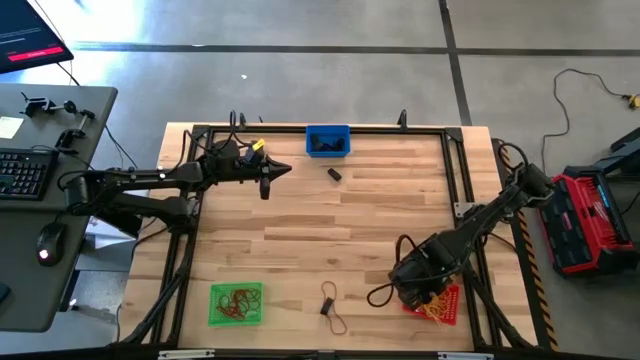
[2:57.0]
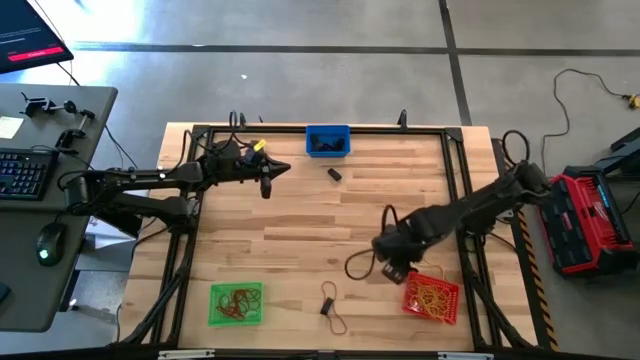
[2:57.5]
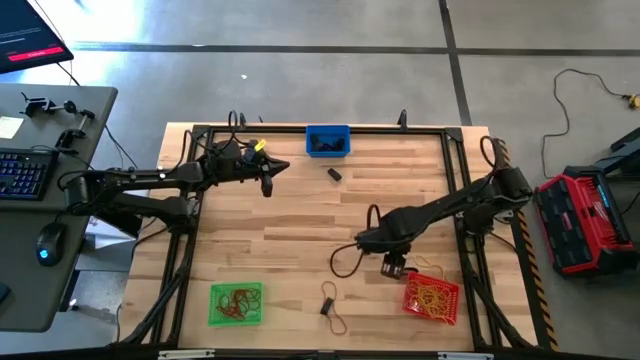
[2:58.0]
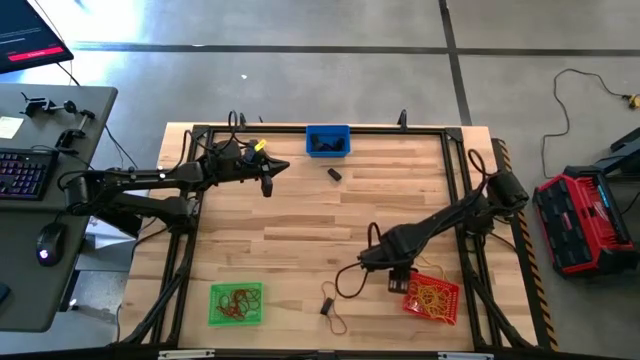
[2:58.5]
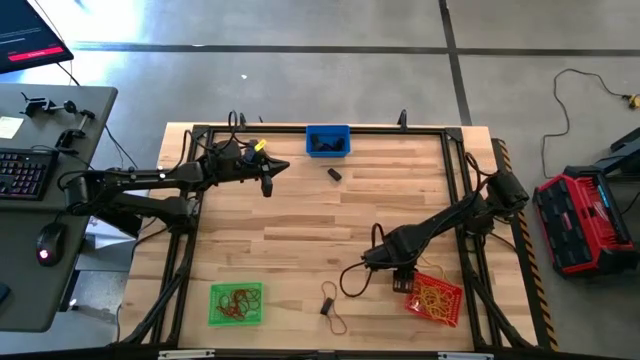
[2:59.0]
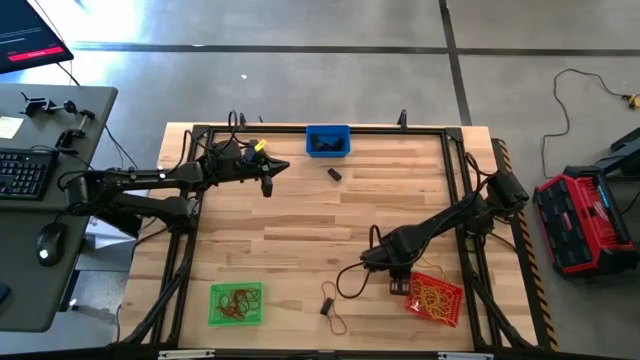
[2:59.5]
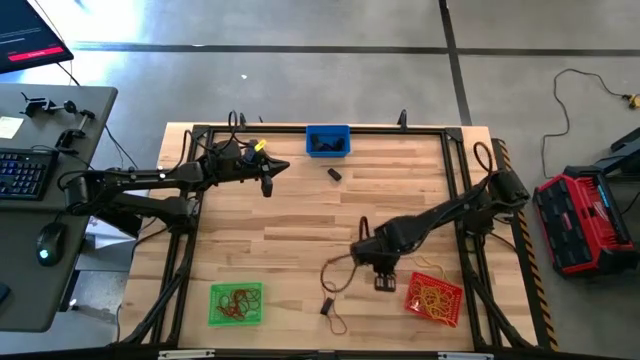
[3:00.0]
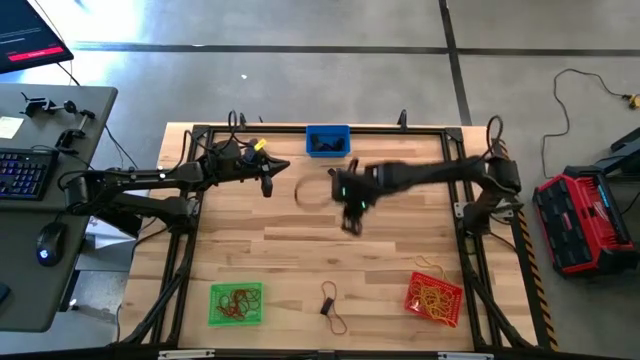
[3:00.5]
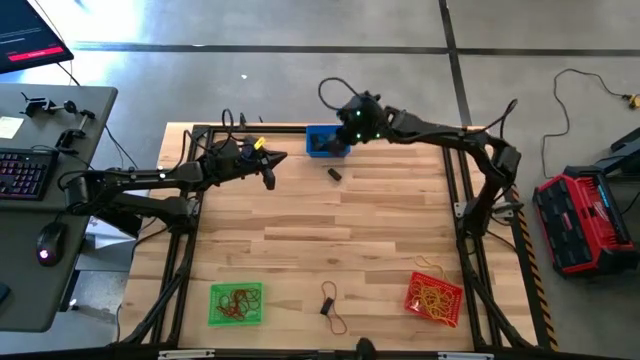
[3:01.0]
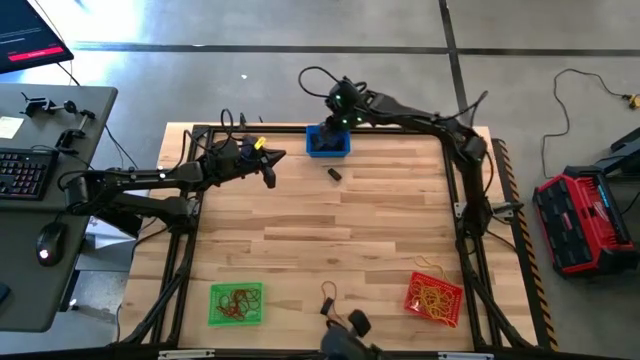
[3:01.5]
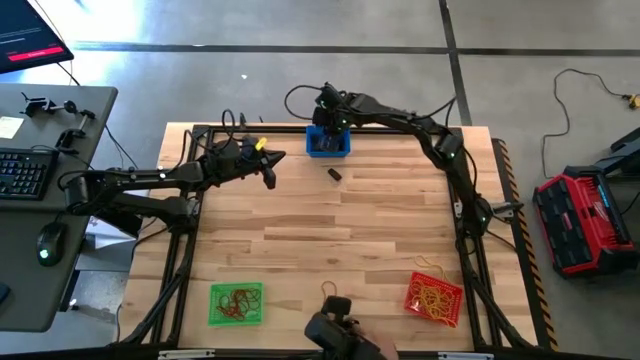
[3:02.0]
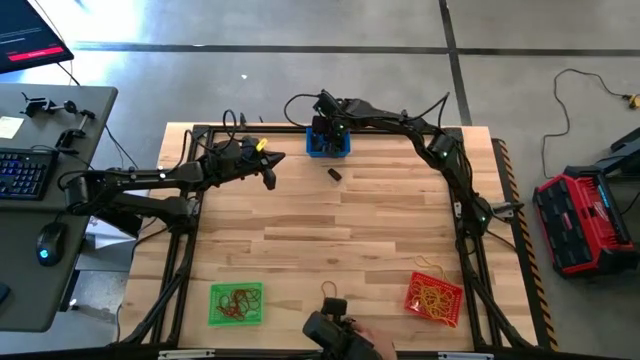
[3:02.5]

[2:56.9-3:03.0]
Task: Sort rubber bands into baskets
Put the black rubber band into the blue basket

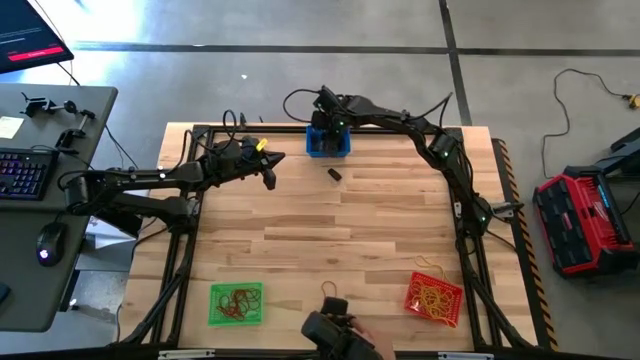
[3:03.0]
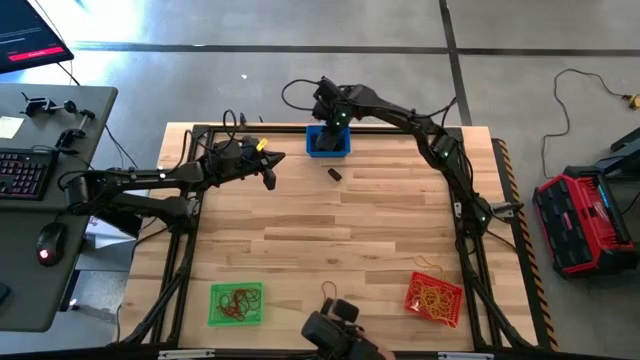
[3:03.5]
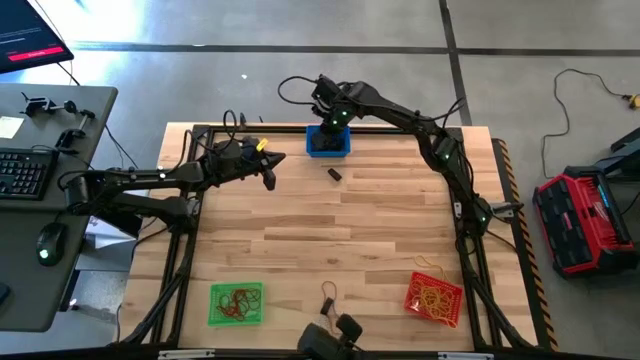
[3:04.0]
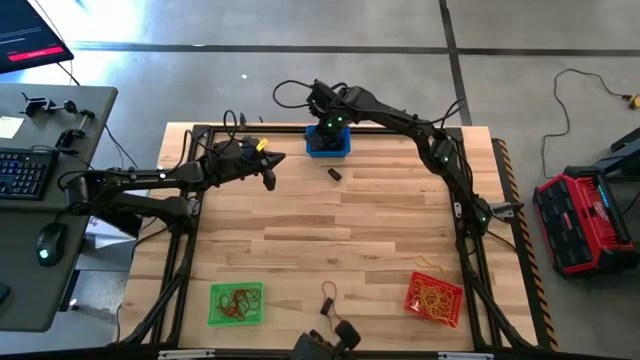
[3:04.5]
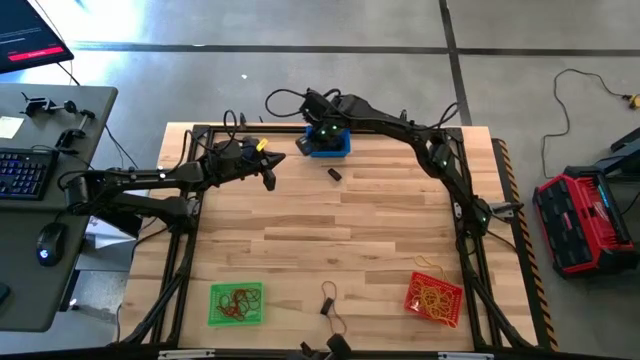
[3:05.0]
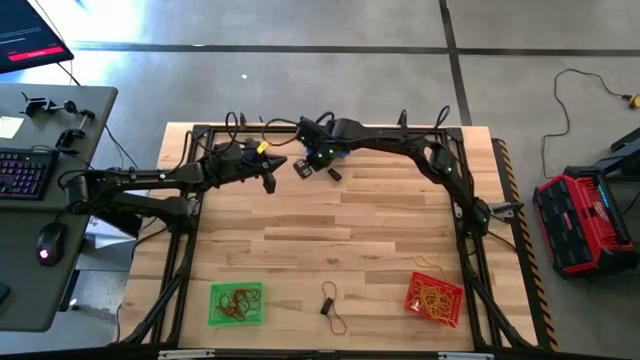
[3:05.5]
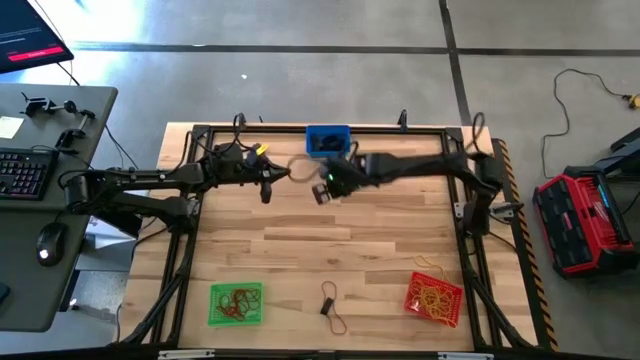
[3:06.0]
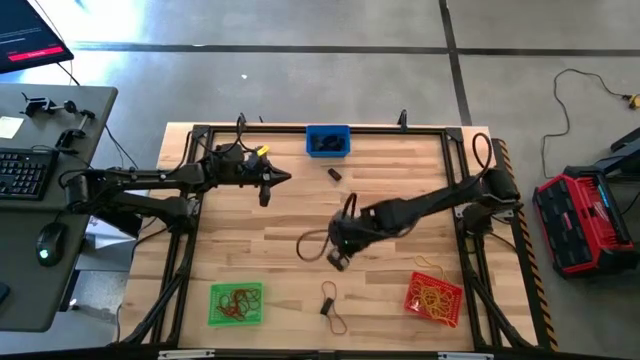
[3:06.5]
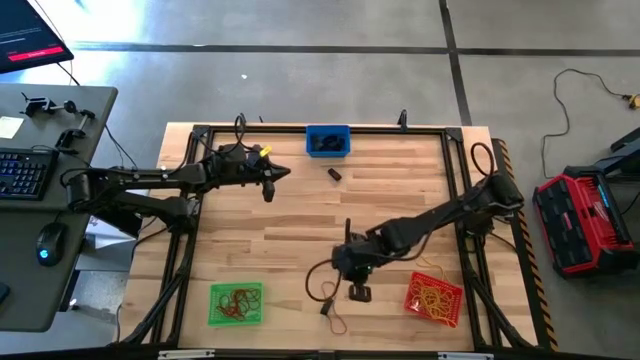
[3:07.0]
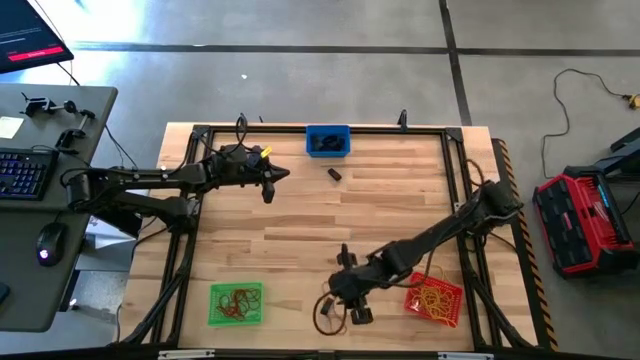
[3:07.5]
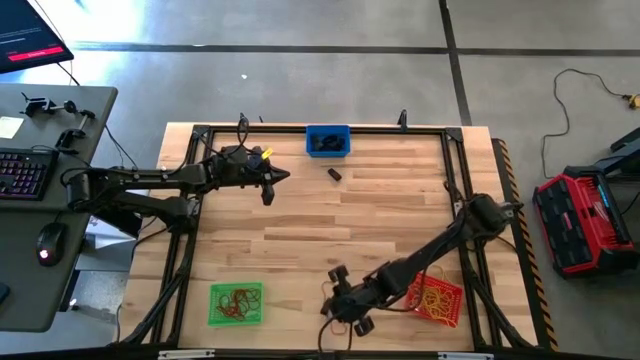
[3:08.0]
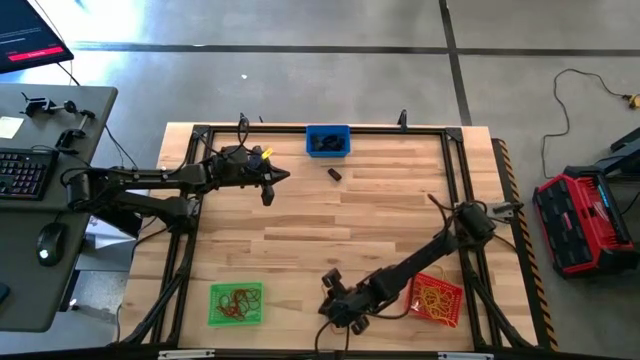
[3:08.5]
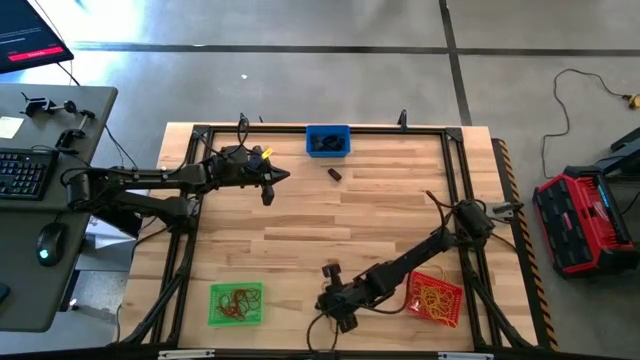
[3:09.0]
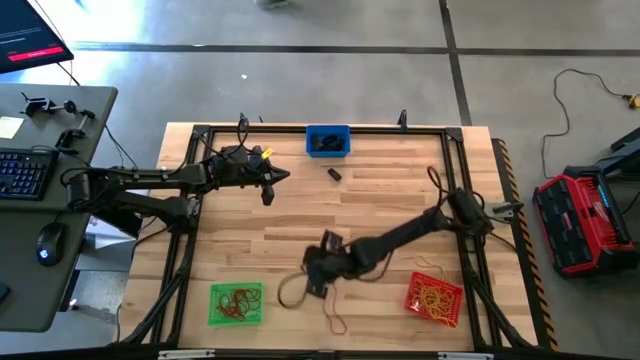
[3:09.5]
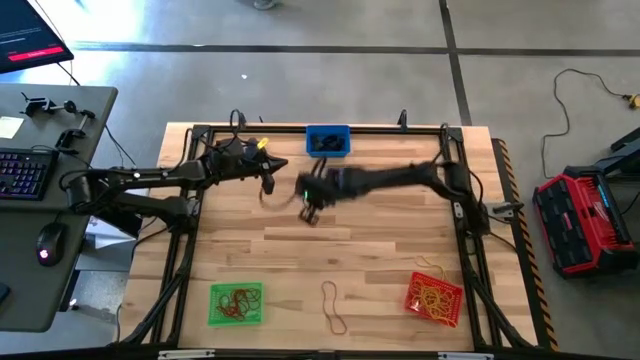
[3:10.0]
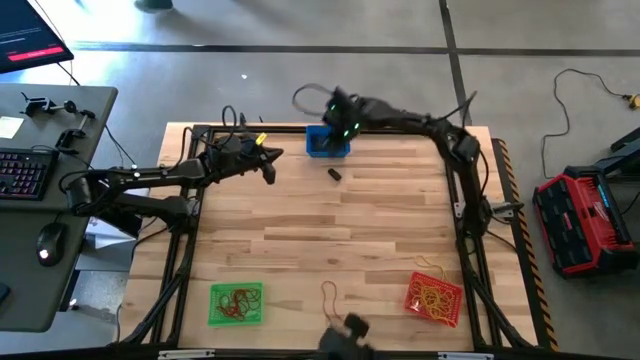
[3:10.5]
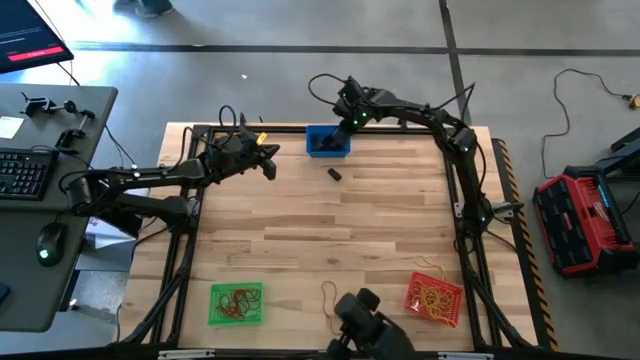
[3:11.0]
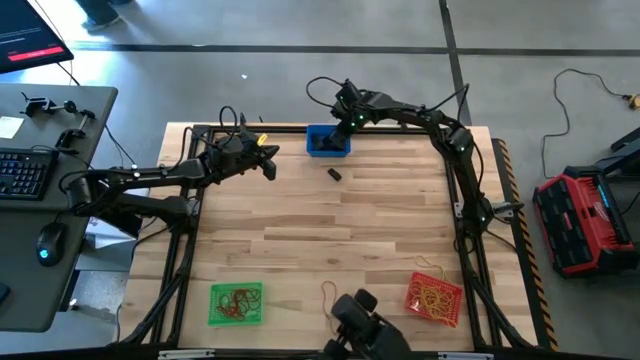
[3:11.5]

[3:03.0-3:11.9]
Put the black rubber band into the blue basket

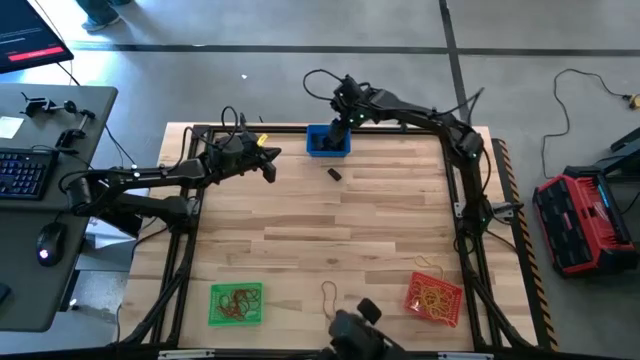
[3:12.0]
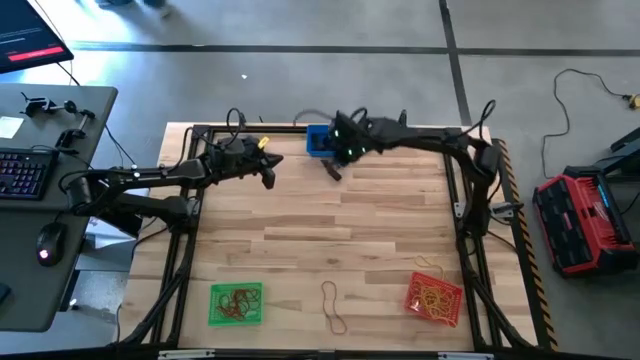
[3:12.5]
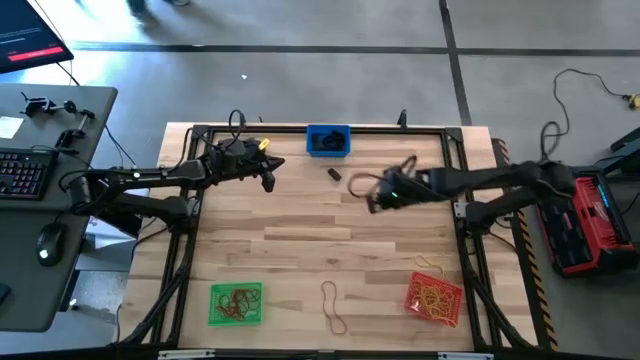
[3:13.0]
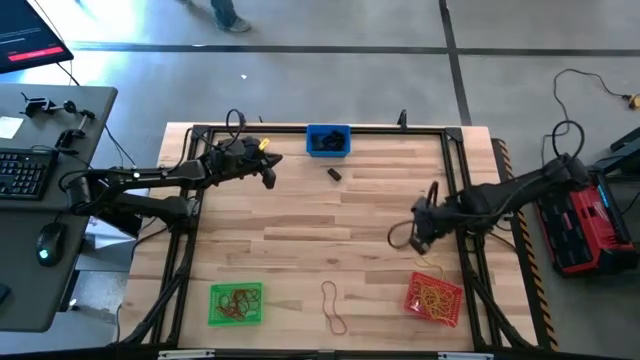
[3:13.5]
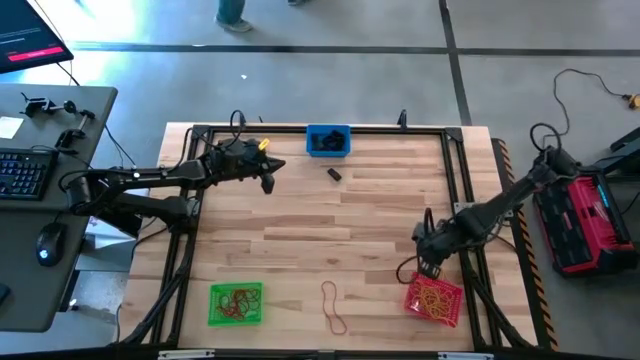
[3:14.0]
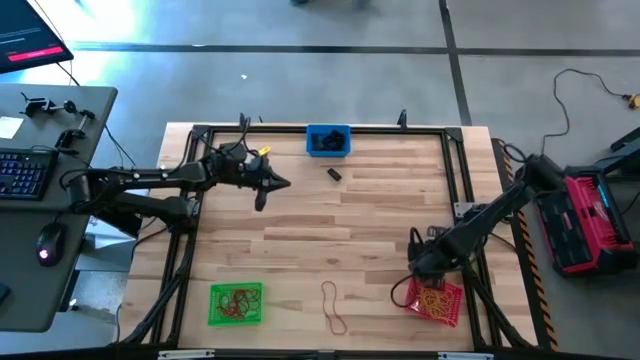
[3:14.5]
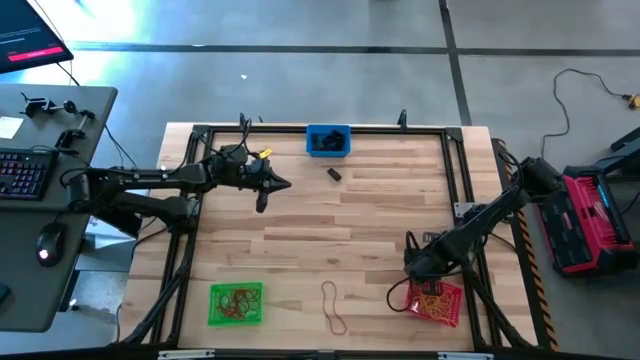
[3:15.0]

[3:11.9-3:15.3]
Put the yellow rubber band into the red basket
